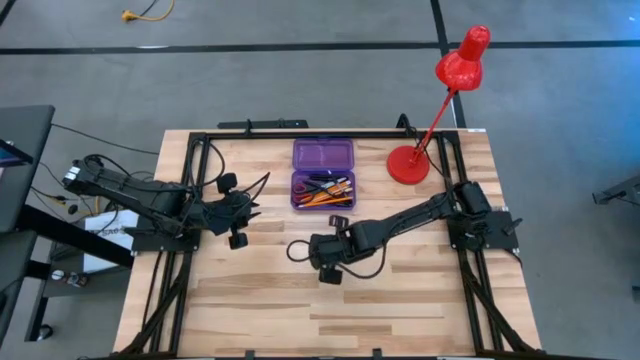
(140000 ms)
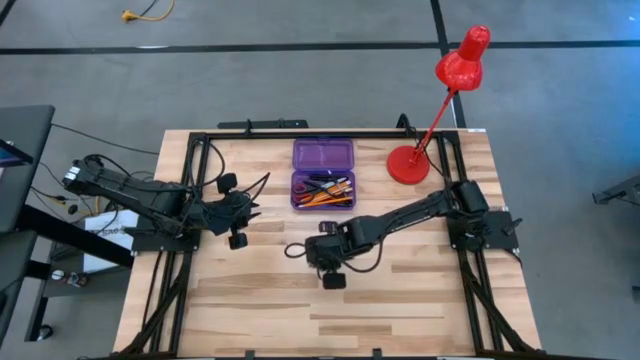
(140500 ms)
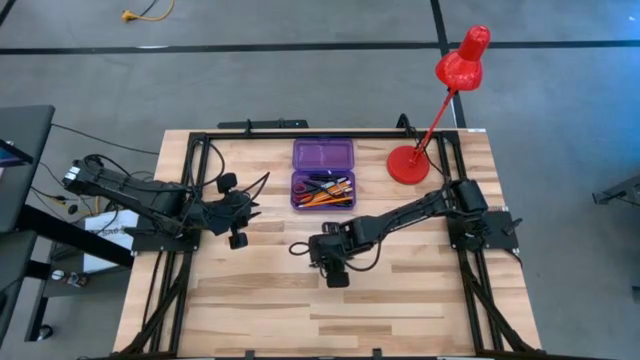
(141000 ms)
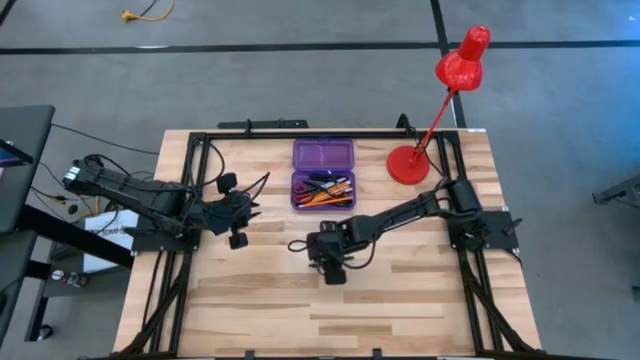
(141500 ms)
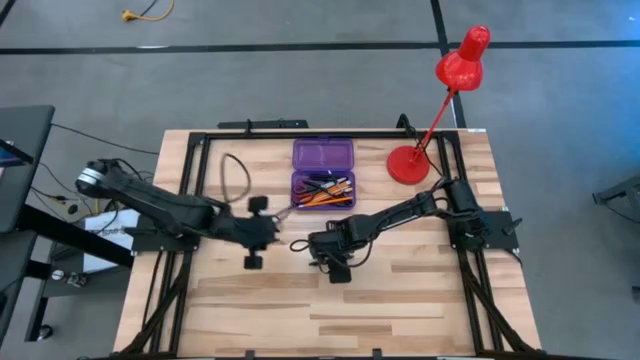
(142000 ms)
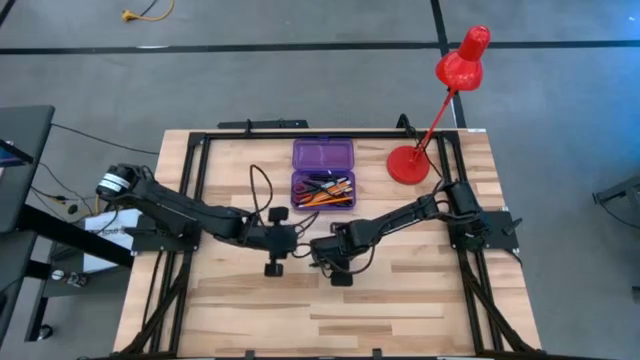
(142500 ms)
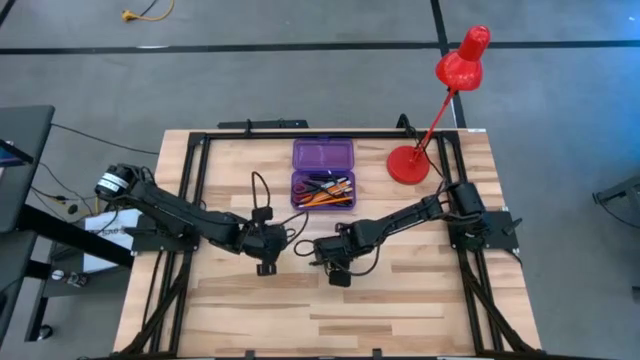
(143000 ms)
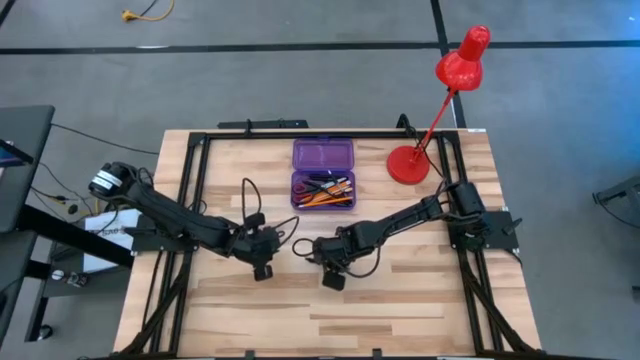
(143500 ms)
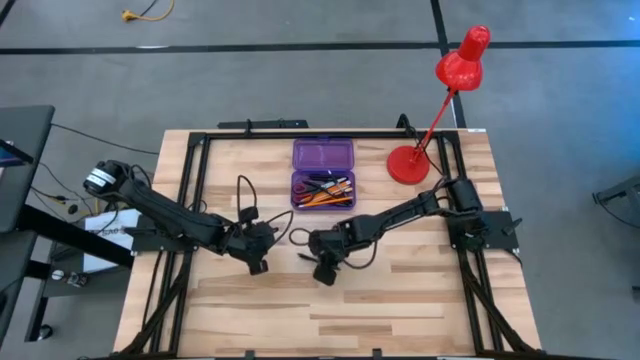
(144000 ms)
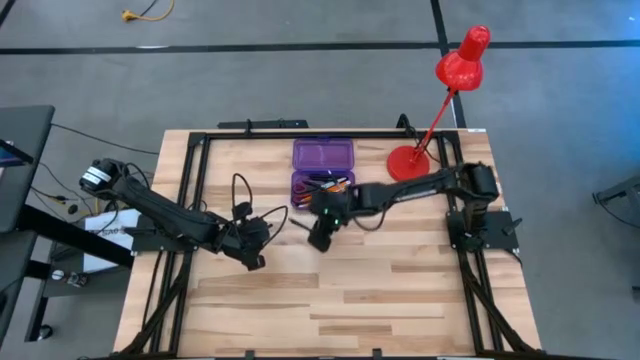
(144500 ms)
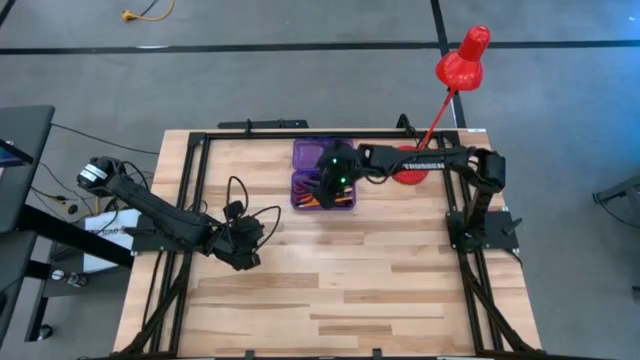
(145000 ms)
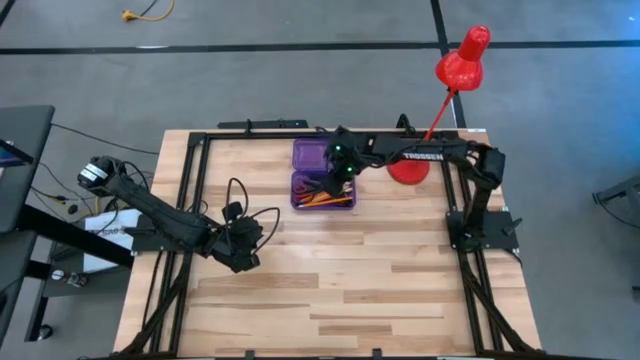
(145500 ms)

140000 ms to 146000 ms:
Task: Pick & place school supplies into a supply box
Put the black pen into the purple supply box

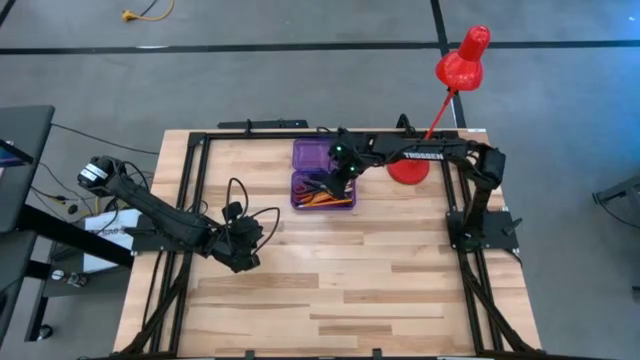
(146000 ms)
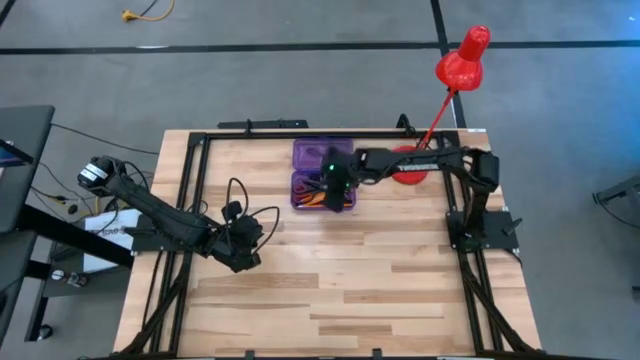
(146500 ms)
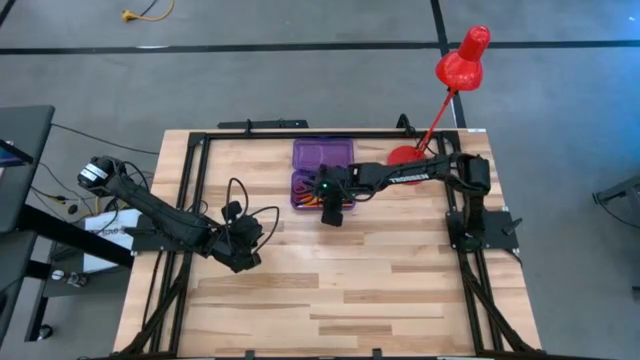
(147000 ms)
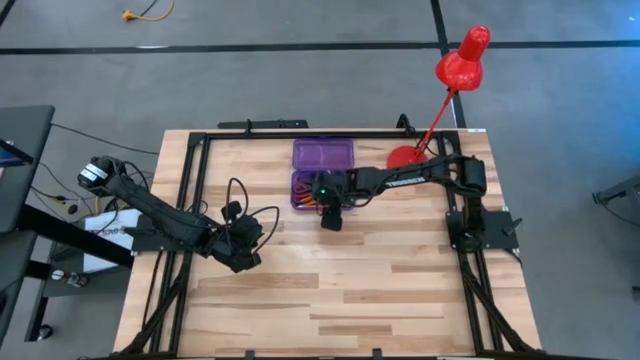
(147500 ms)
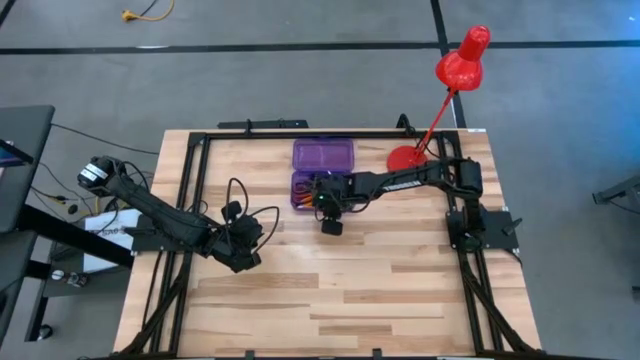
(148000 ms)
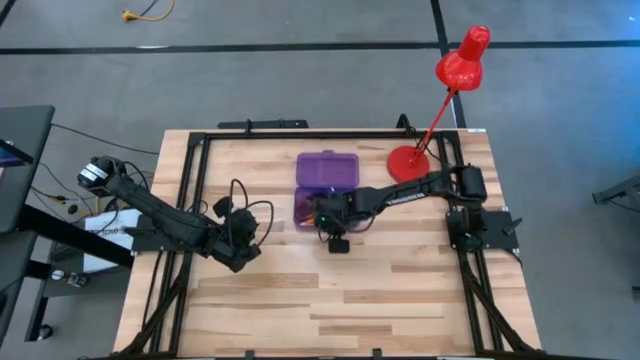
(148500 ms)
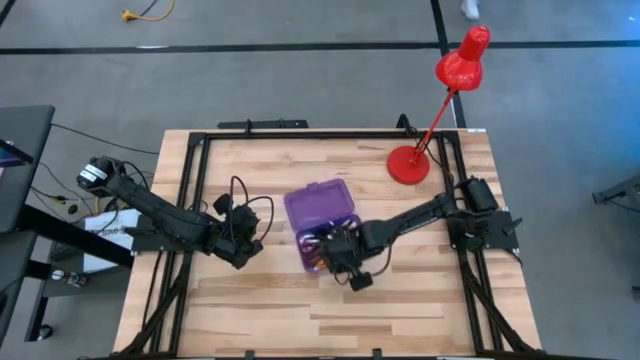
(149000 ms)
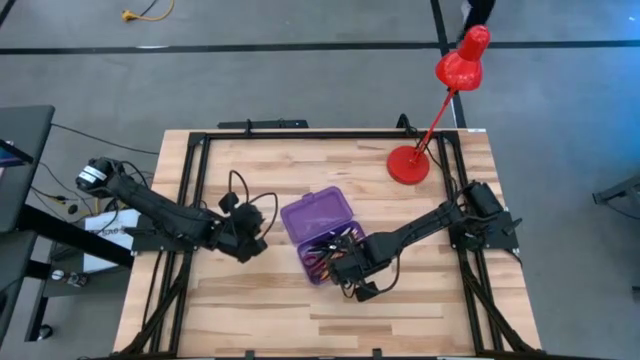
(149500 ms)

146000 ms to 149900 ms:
Move the purple supply box to the center of the table

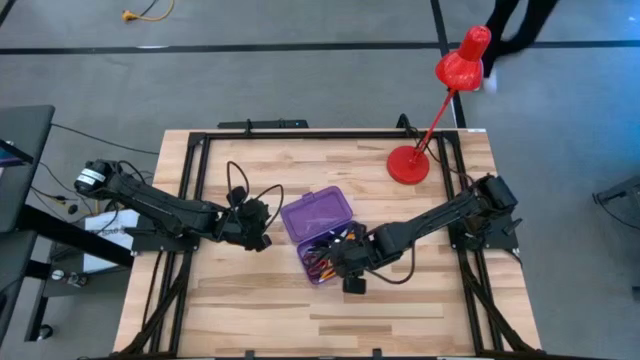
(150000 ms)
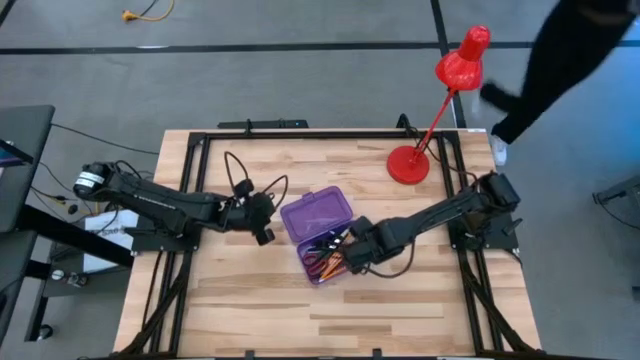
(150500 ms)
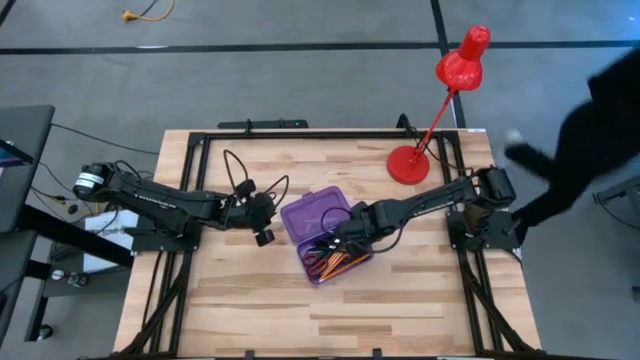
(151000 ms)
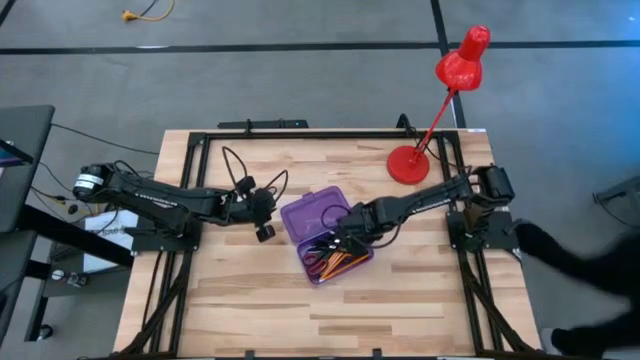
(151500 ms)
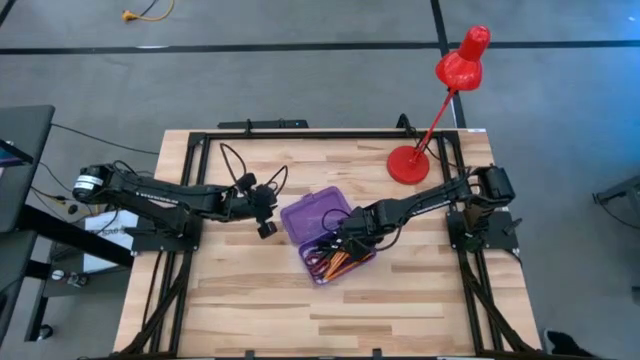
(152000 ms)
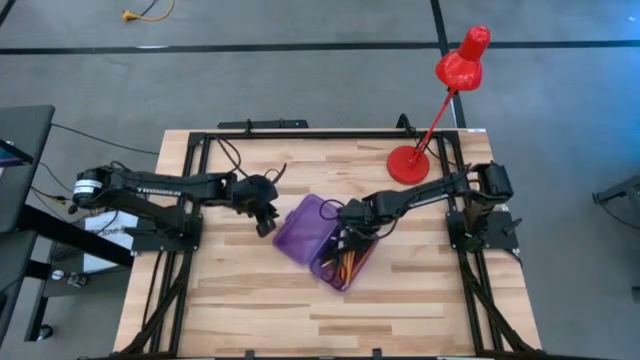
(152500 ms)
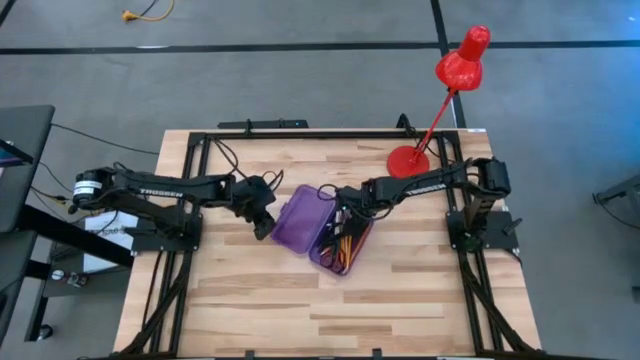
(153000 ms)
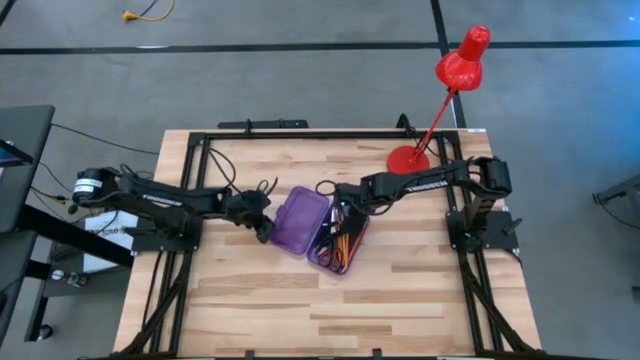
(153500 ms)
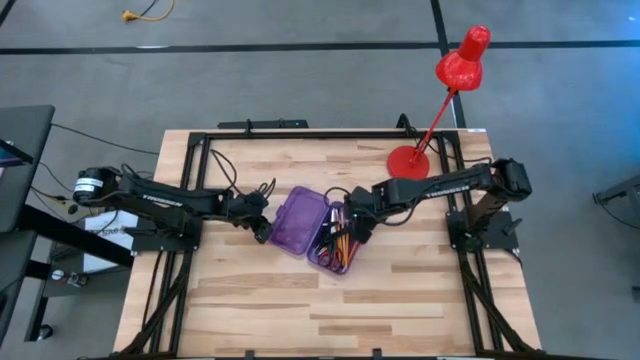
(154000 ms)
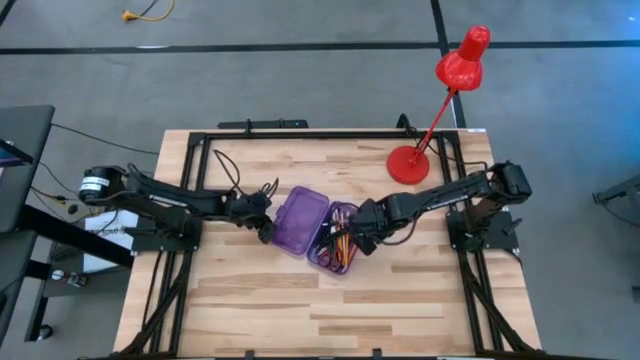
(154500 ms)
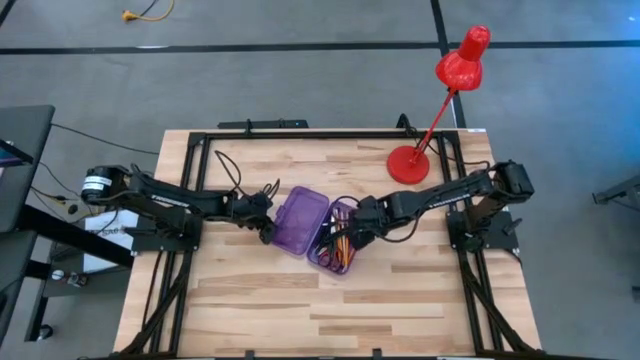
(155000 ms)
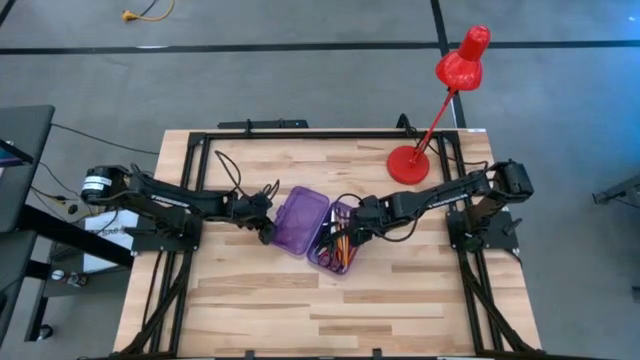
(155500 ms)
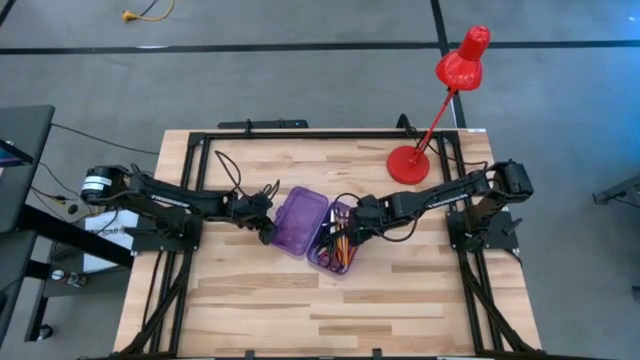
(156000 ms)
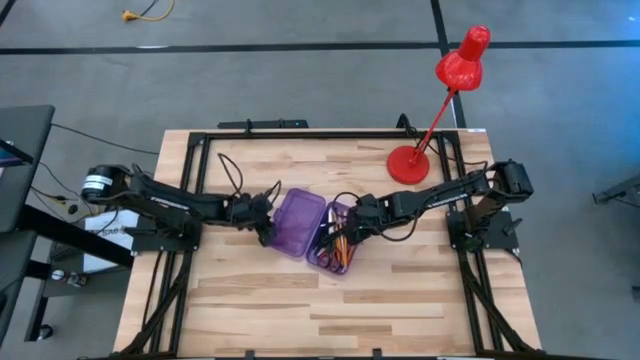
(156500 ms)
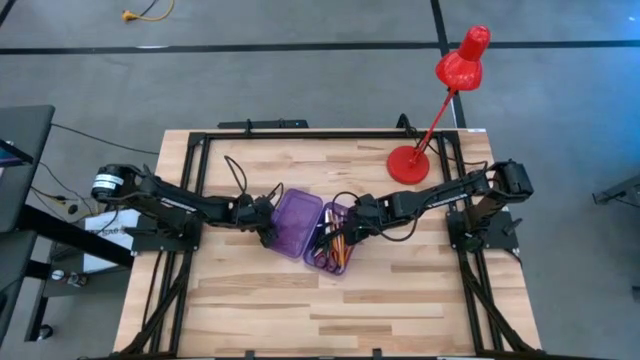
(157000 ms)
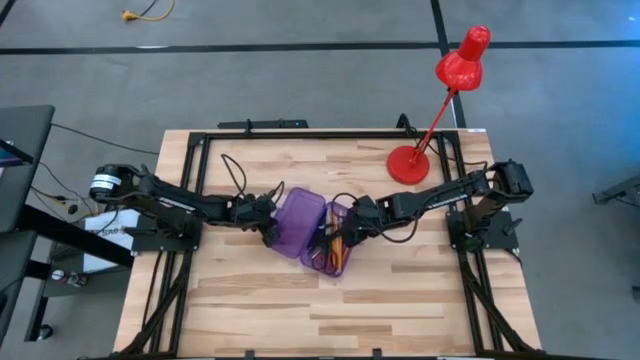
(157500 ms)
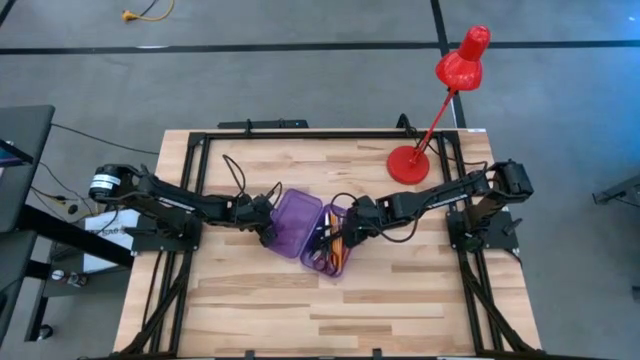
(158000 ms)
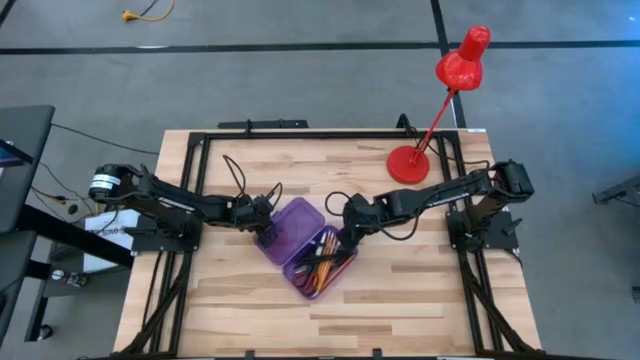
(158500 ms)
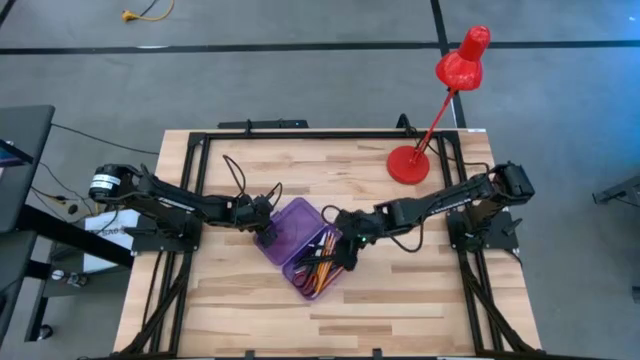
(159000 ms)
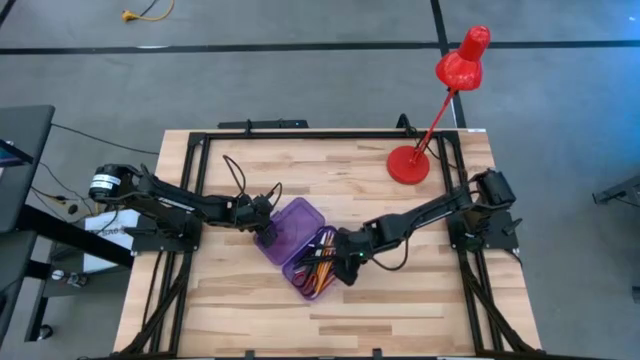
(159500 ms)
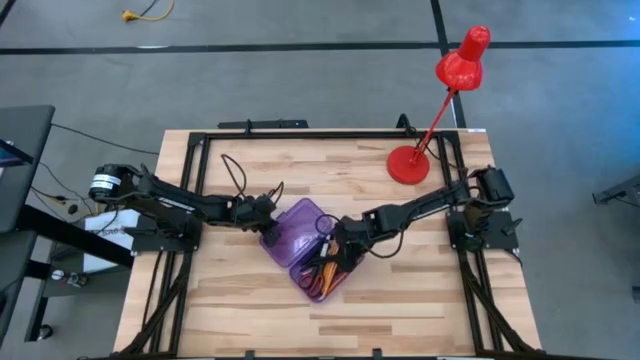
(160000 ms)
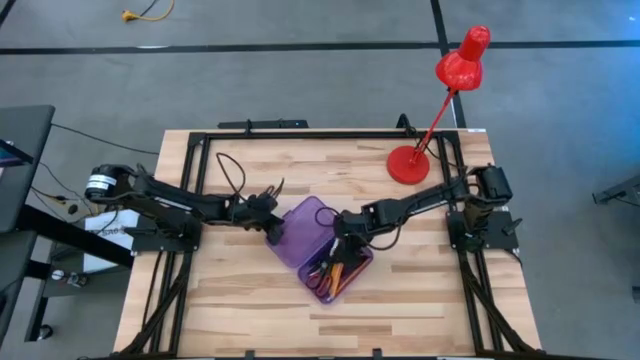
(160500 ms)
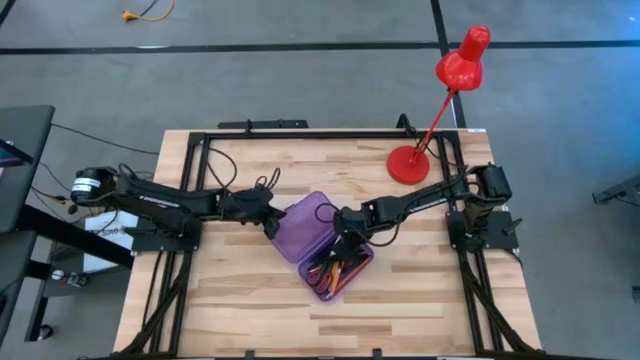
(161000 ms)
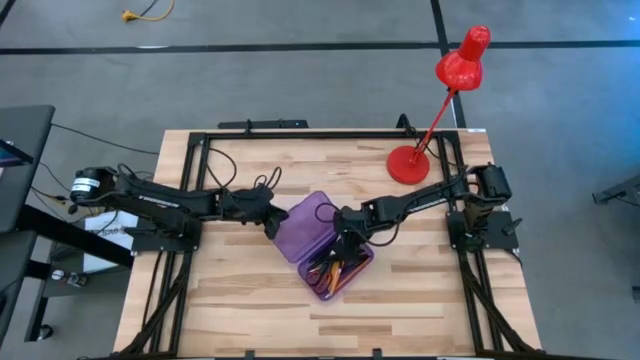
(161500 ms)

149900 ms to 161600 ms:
Close the purple supply box
